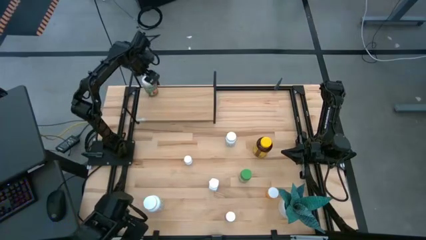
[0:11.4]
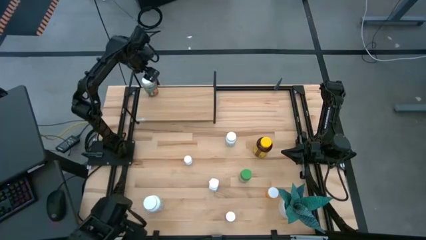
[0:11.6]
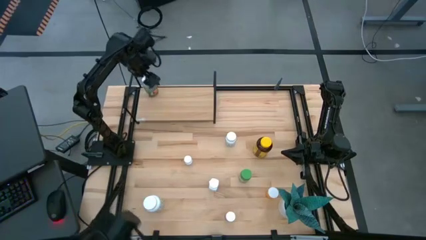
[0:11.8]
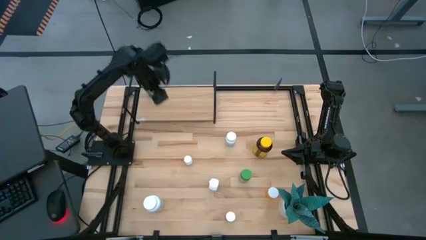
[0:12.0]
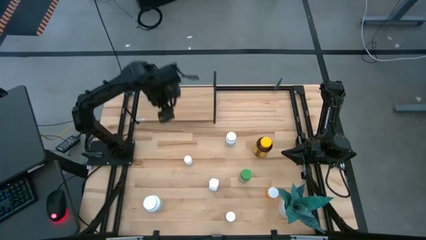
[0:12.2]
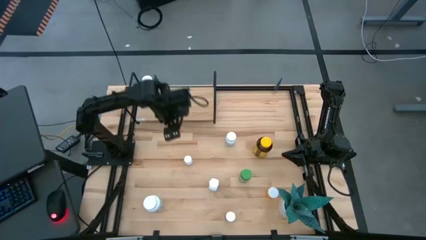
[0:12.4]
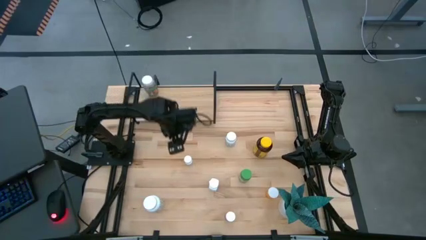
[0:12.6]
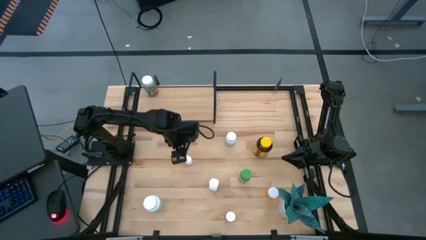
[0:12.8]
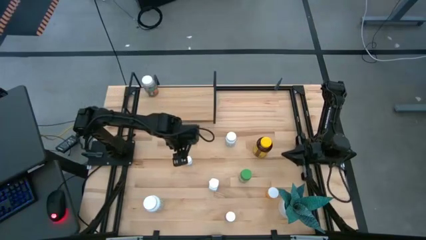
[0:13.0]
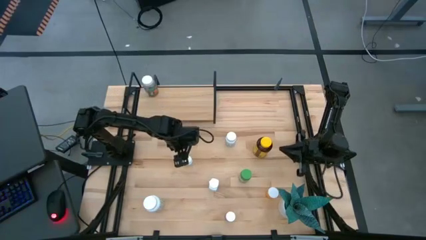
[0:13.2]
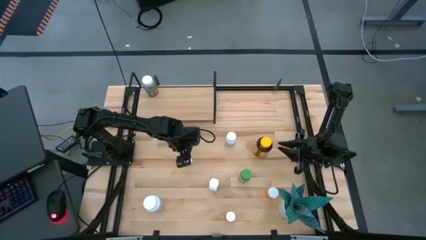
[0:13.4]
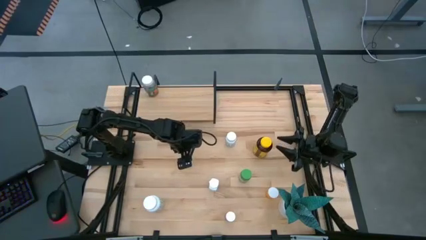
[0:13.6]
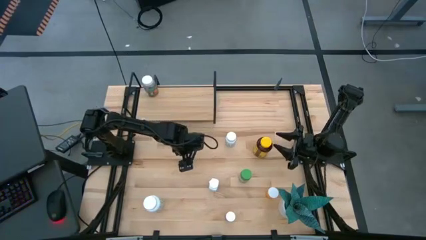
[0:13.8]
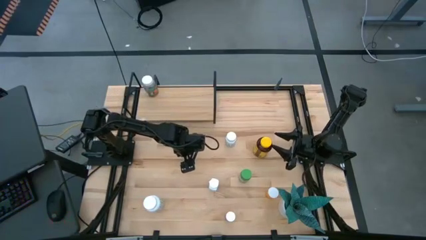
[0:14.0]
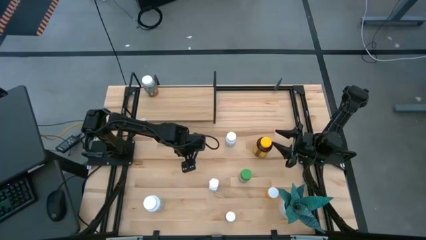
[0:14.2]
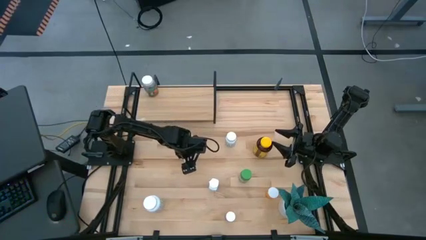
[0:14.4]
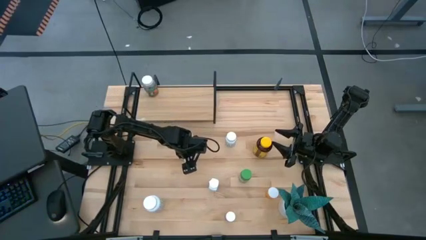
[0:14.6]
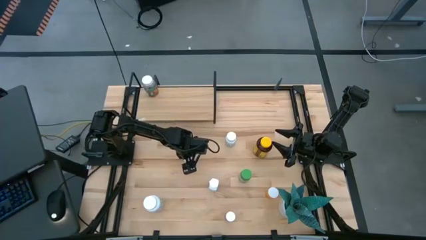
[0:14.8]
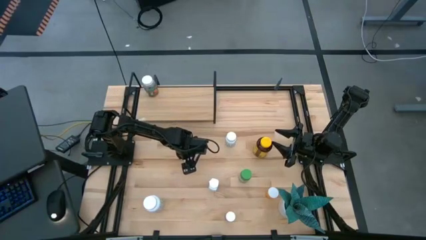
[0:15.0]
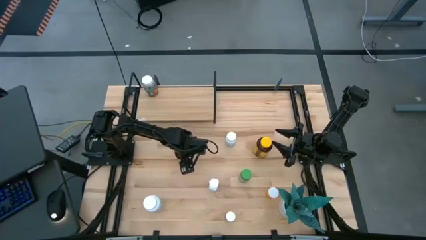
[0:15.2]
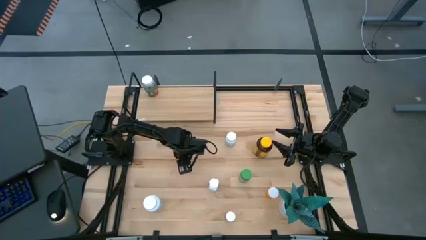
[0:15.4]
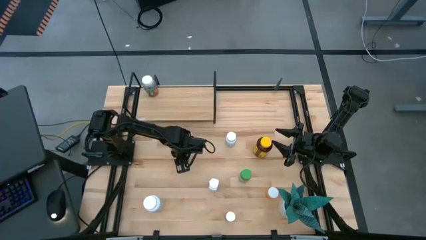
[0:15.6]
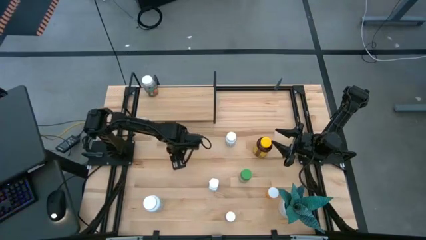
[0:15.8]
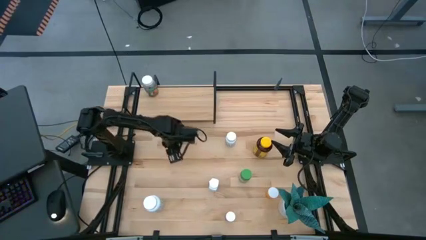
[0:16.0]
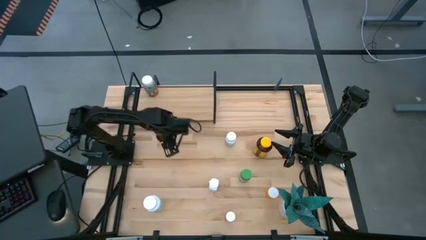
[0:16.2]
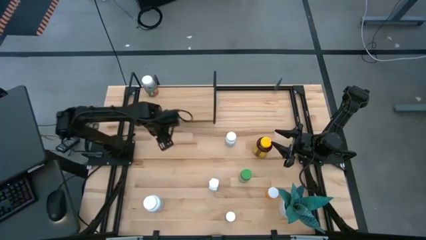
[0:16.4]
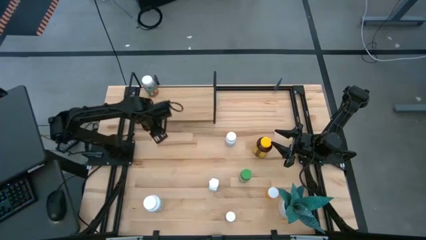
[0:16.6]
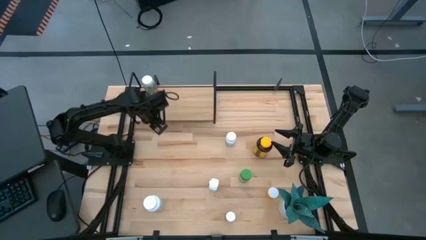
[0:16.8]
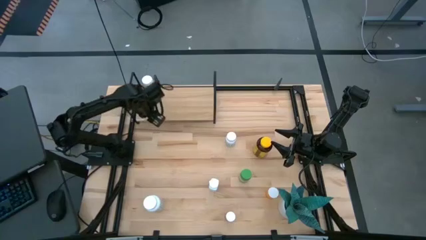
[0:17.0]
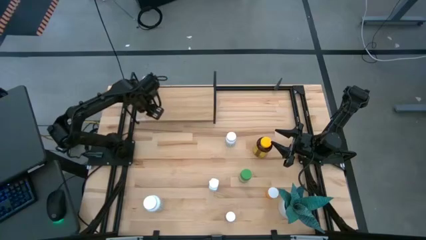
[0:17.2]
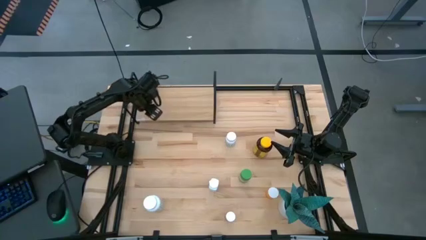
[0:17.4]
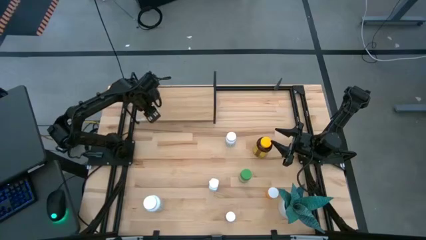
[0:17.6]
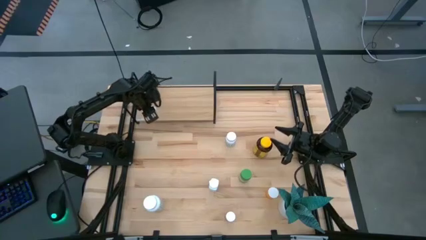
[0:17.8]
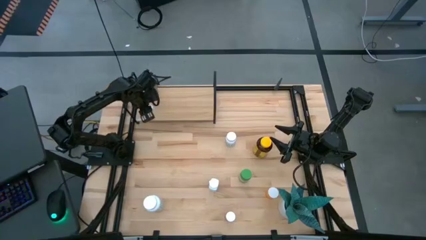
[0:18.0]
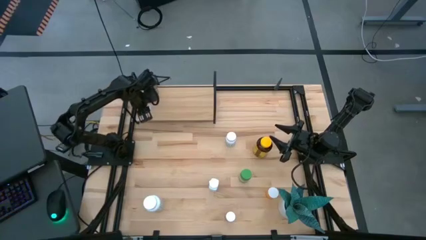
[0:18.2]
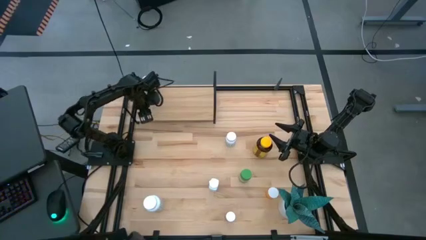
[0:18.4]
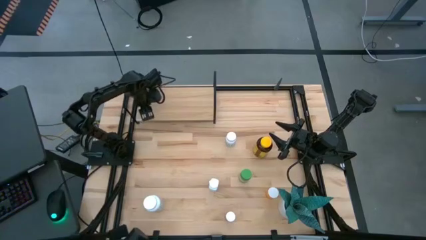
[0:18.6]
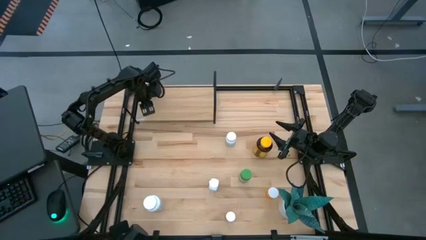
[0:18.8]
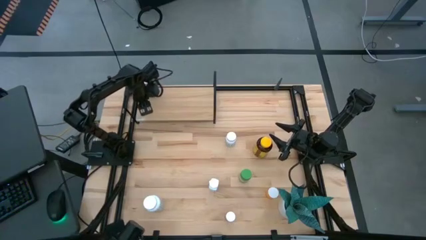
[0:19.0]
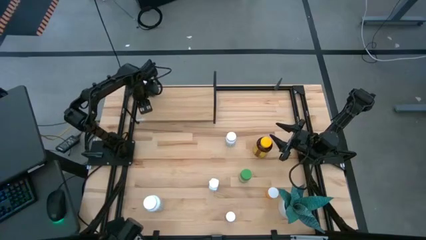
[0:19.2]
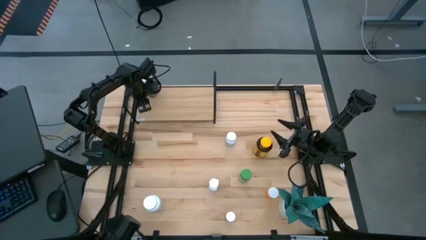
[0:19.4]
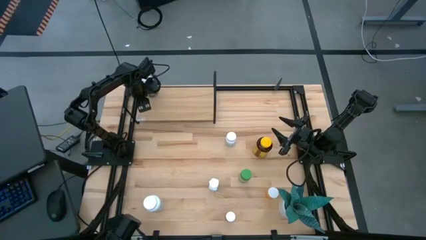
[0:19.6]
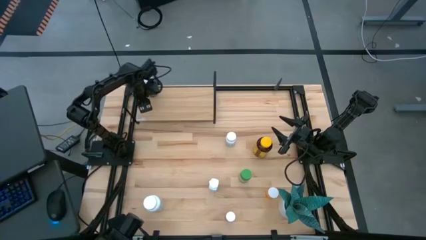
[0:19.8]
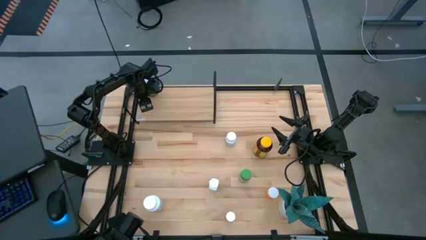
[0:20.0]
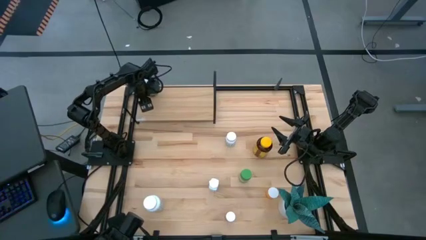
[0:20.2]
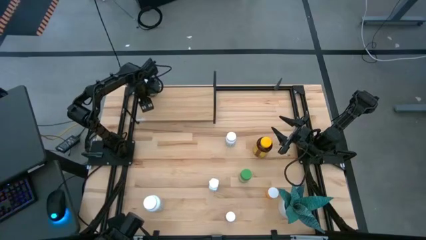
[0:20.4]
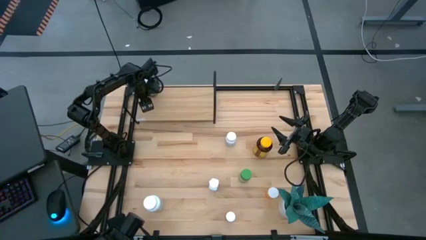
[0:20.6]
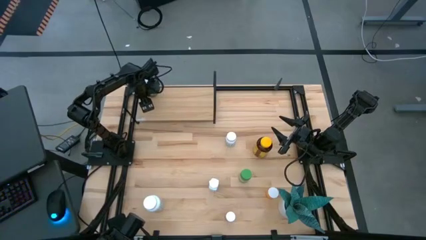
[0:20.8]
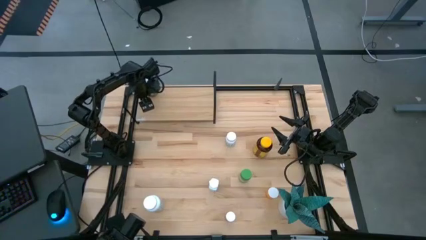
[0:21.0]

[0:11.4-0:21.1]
Task: Pick and place medicine bottles onto shelf by color
Put the white pill bottle on the shelf
